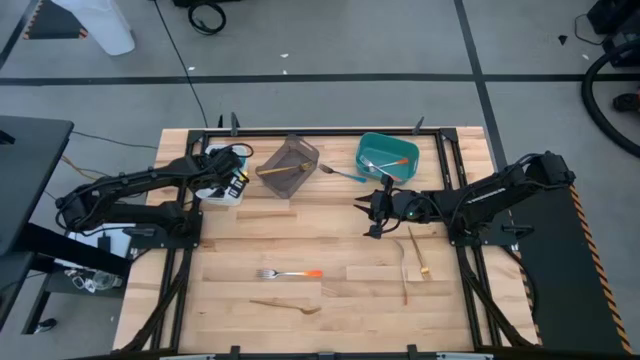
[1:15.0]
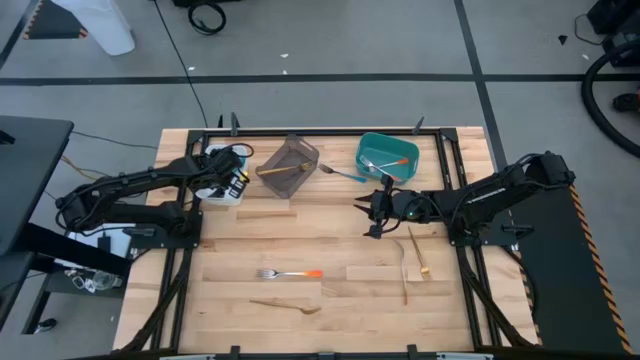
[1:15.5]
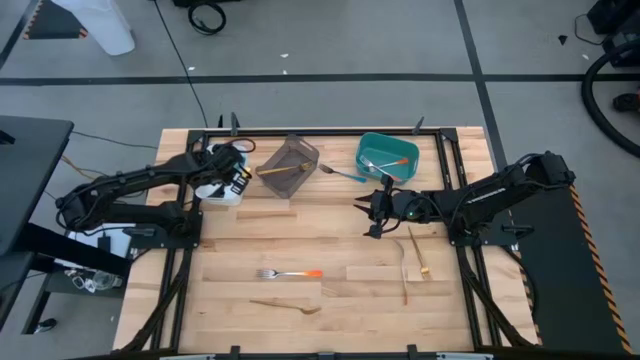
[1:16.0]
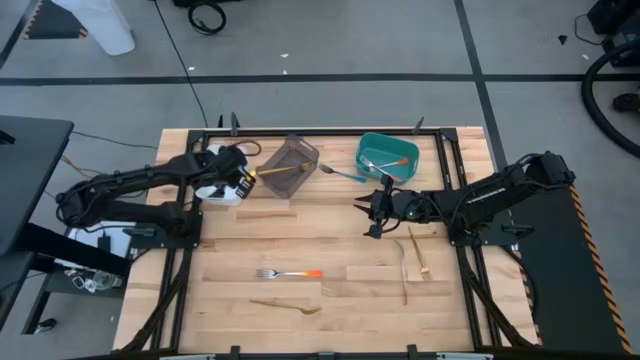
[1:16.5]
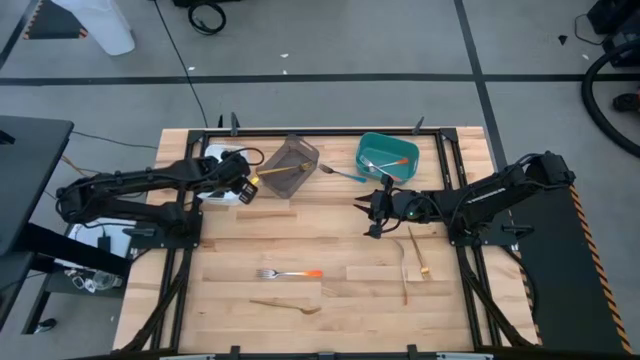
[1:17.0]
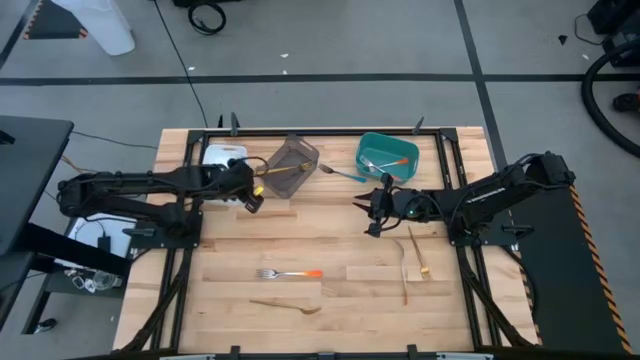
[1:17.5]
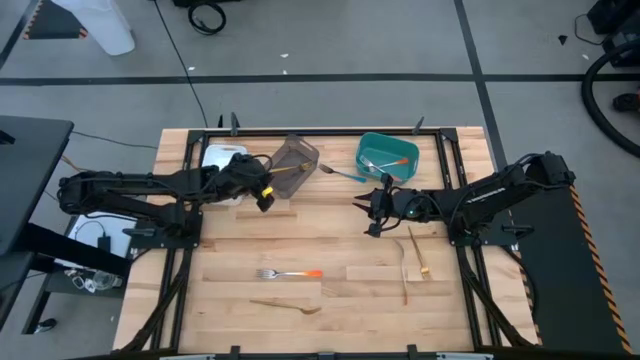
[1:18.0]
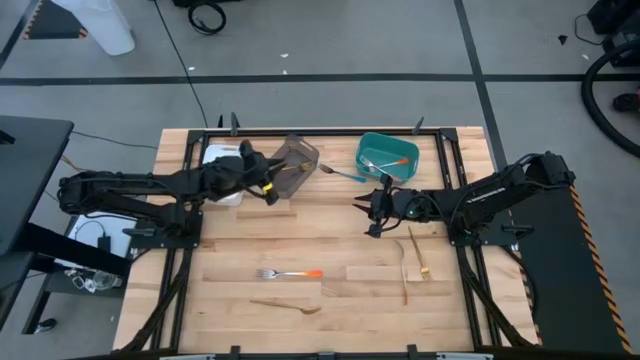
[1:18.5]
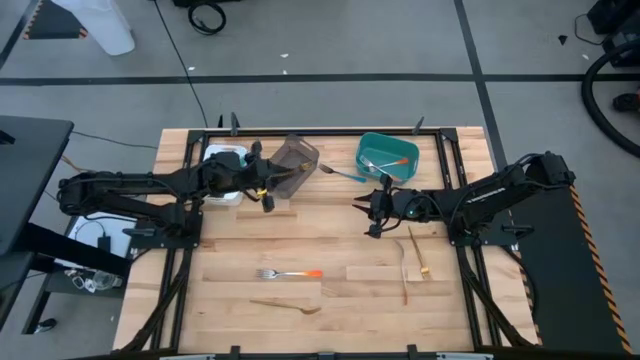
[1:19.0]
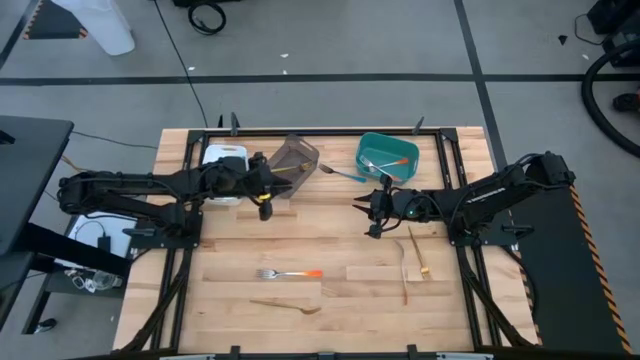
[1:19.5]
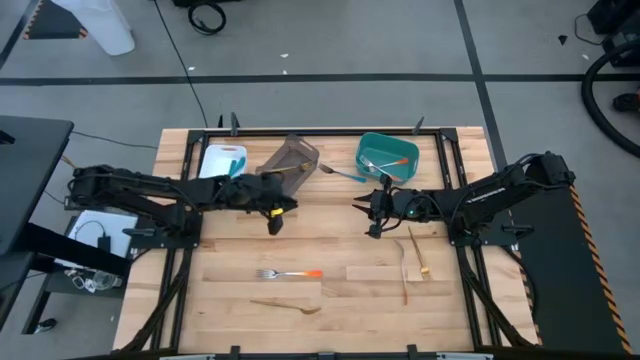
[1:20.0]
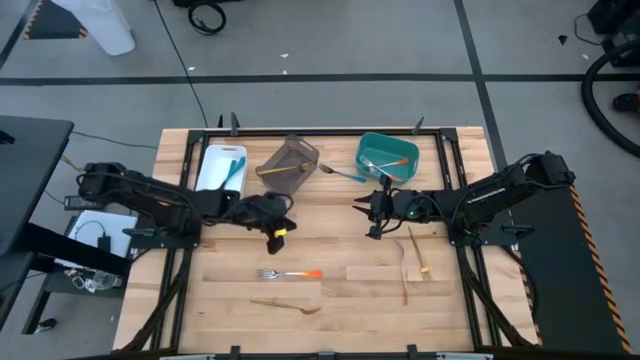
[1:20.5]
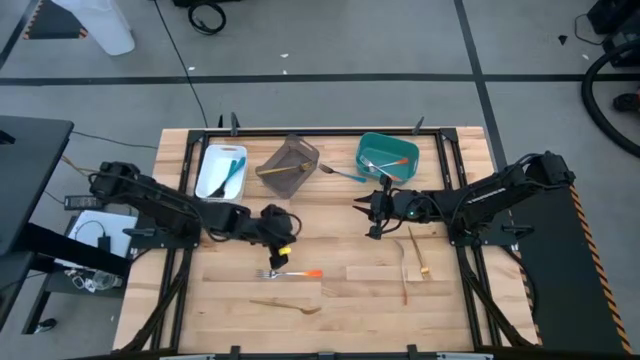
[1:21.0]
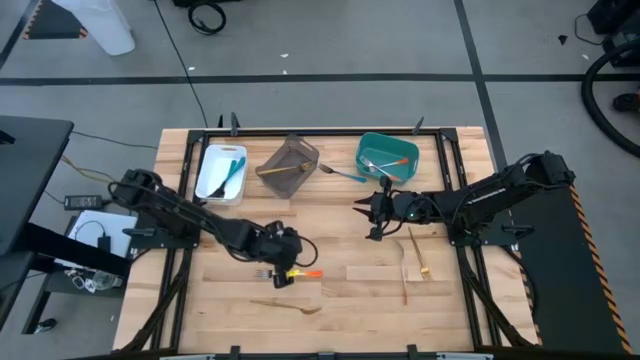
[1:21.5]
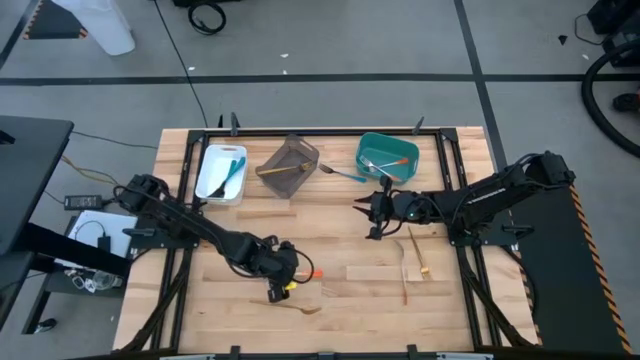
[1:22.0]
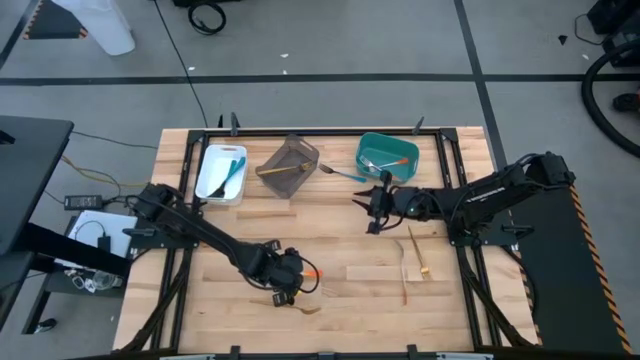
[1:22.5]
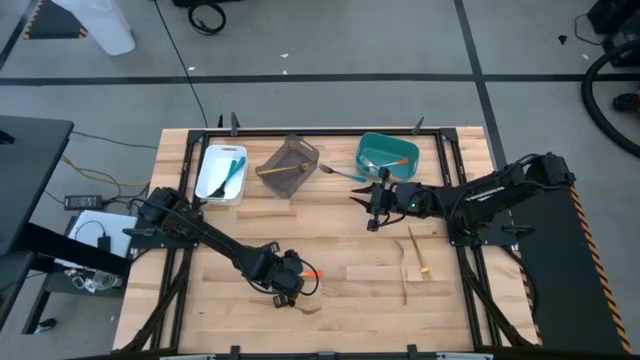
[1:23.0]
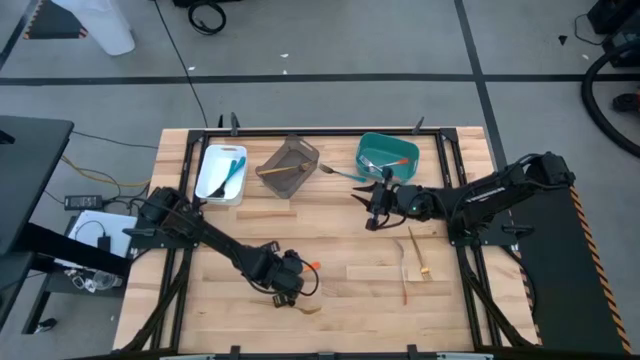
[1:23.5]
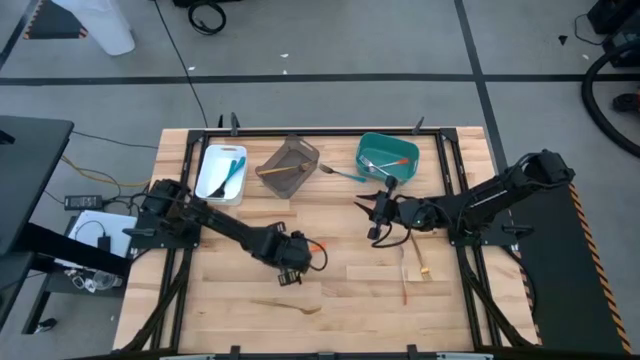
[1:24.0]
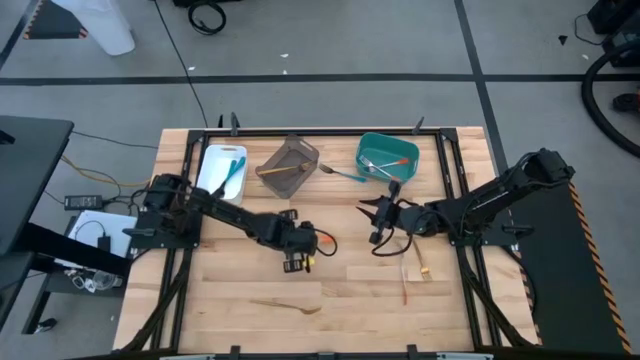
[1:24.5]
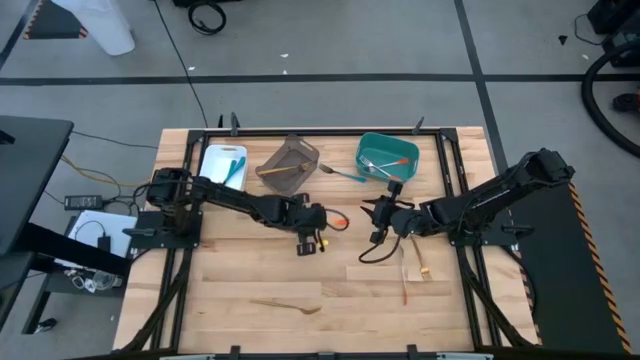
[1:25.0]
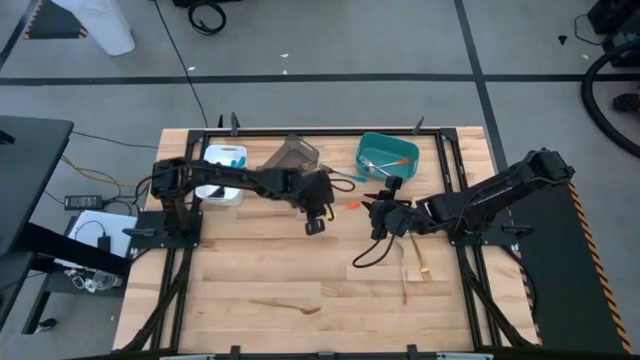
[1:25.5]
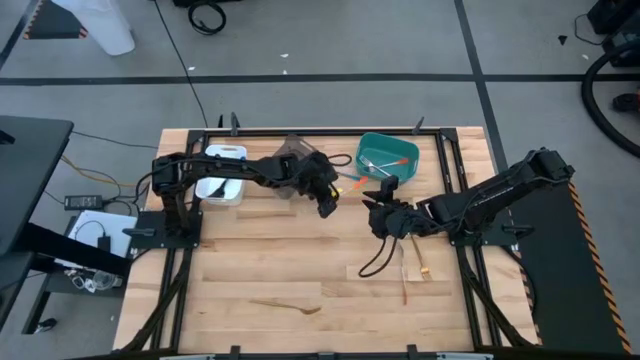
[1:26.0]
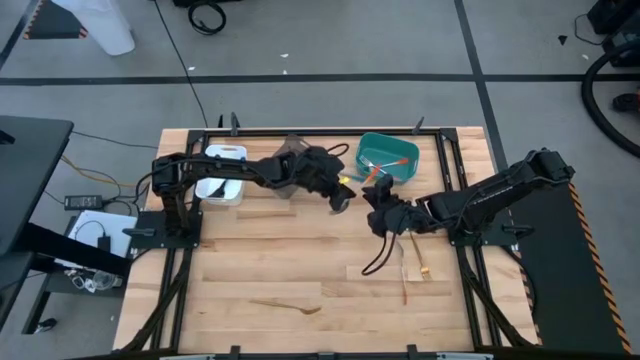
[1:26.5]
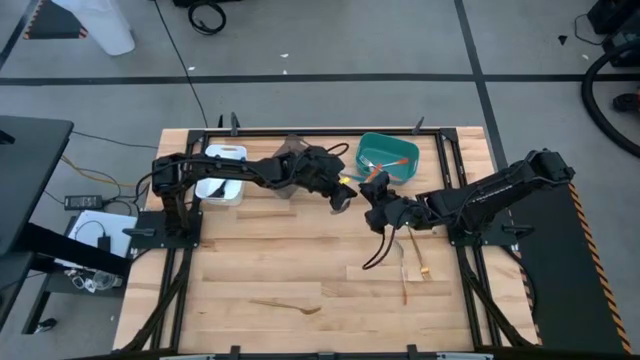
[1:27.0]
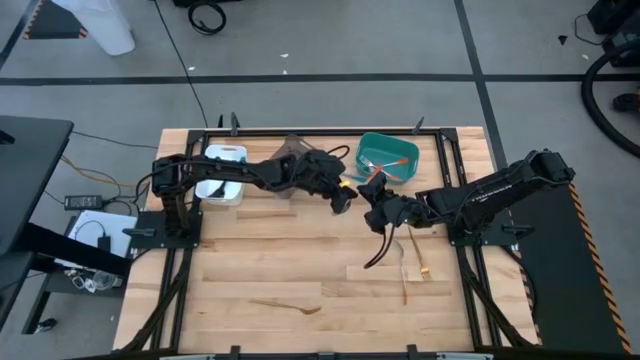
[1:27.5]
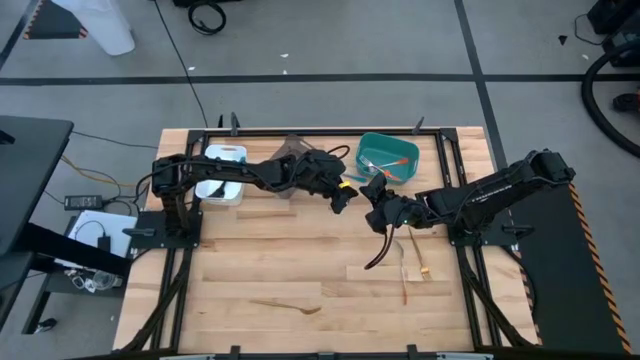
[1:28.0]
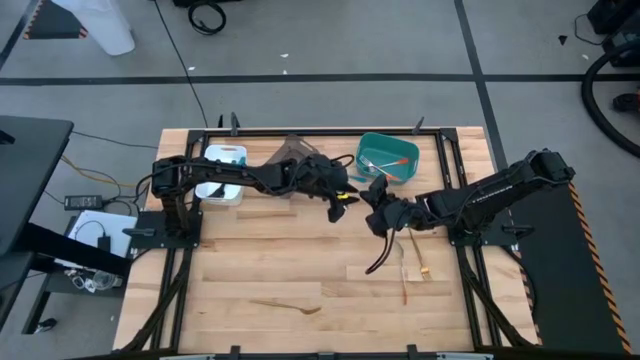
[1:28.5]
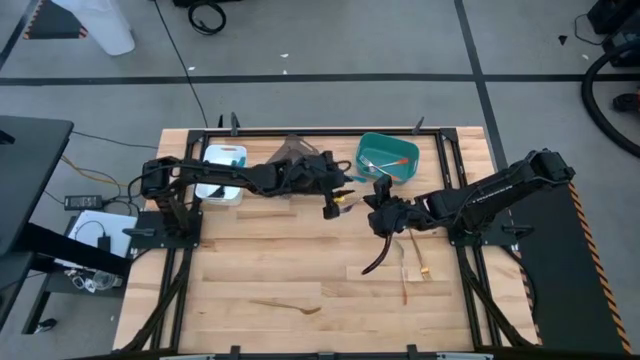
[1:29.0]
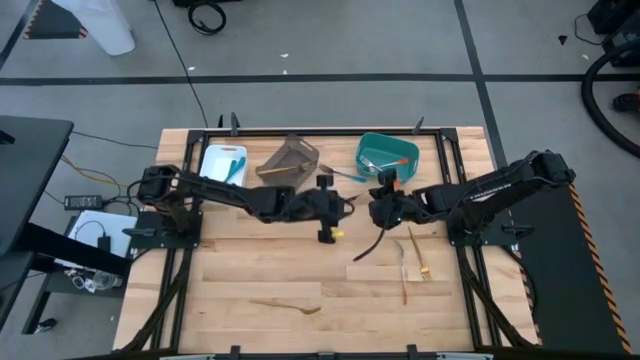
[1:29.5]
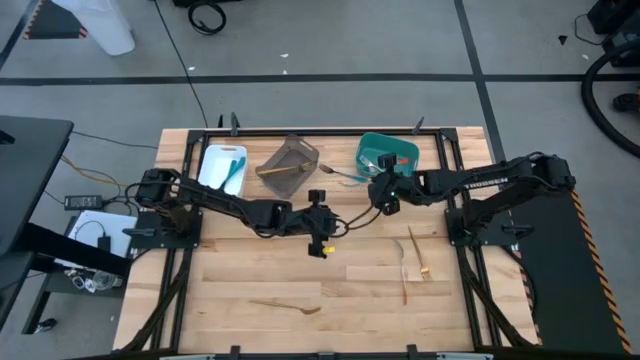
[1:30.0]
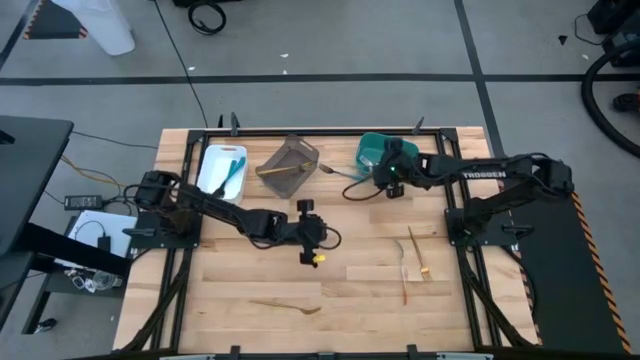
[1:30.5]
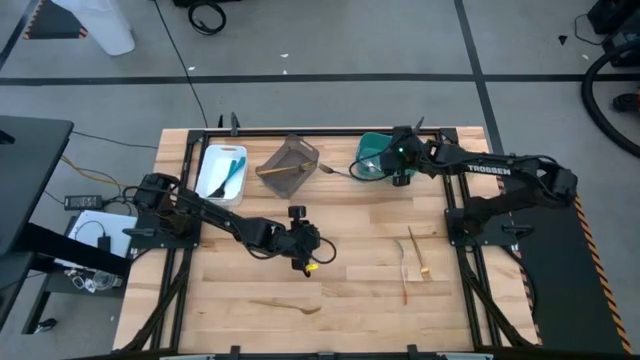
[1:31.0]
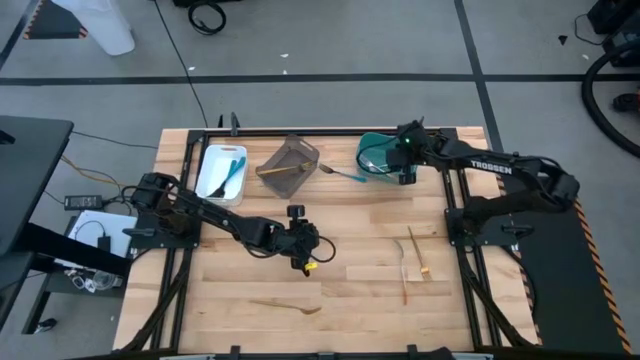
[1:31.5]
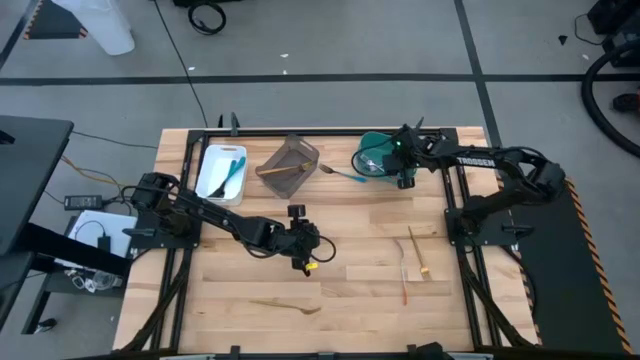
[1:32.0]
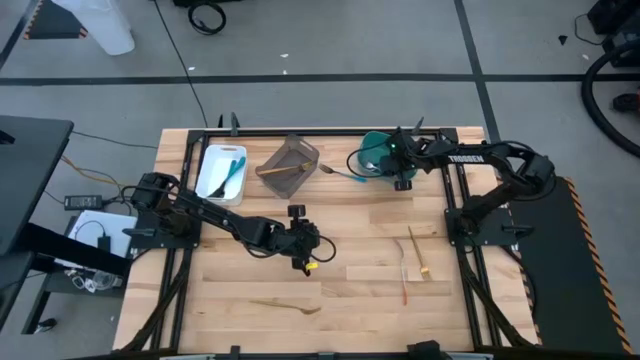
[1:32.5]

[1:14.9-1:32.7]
Task: Sort silverware by color (type)
Put the left orange fork into the green bin

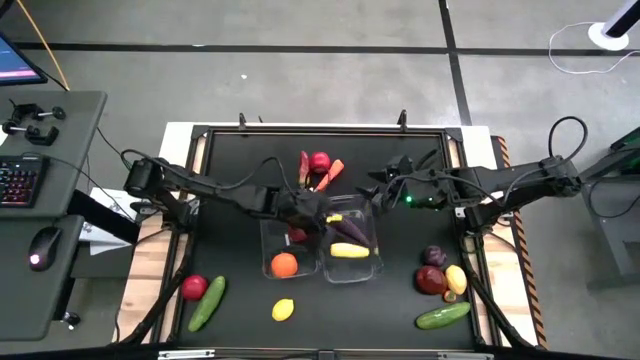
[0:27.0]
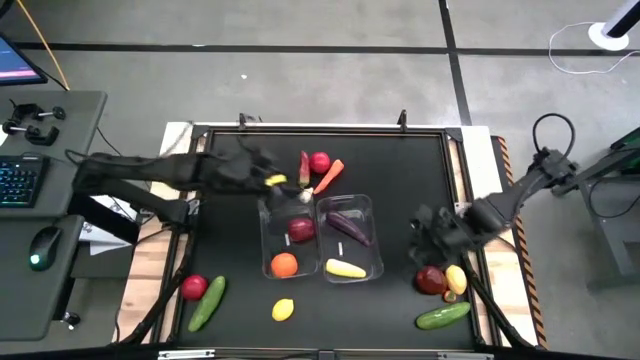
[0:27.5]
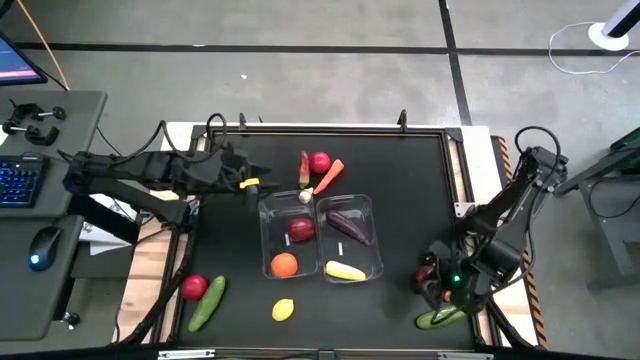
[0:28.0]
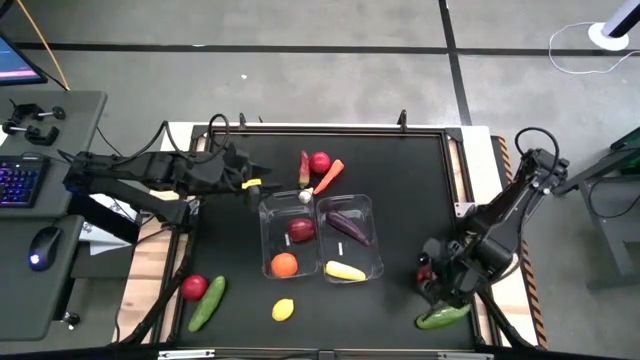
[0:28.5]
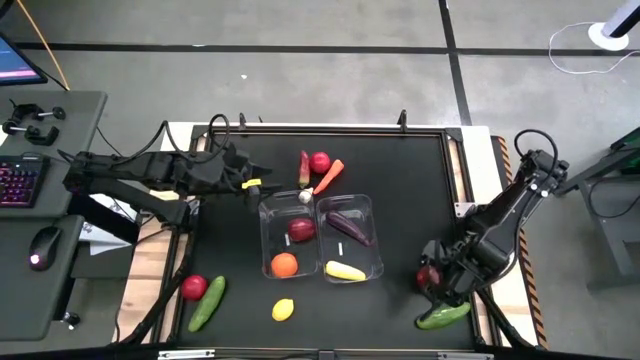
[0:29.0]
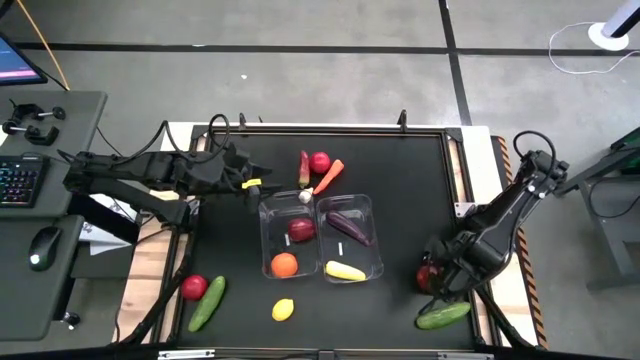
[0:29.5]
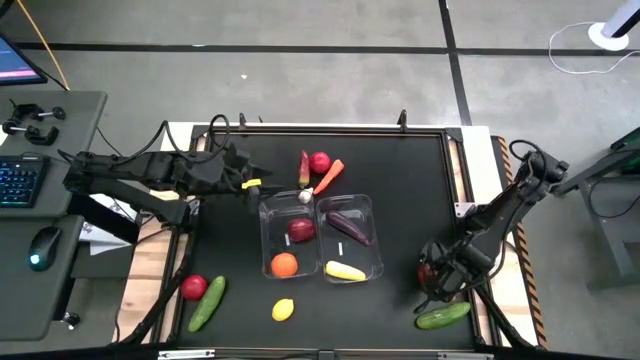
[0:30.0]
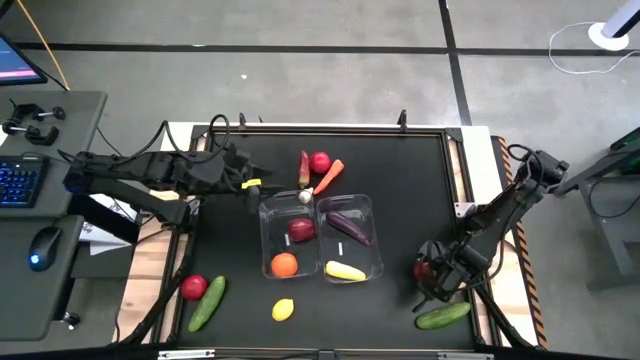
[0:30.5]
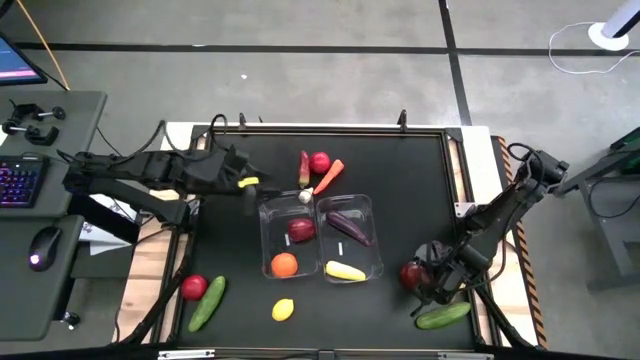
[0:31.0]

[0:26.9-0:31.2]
Task: Sort produce into baskets
Put the apple into the left transparent bin
